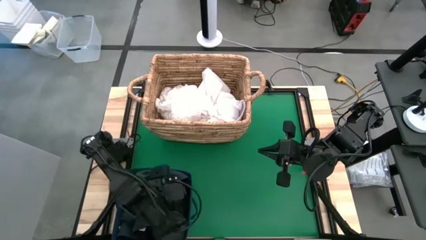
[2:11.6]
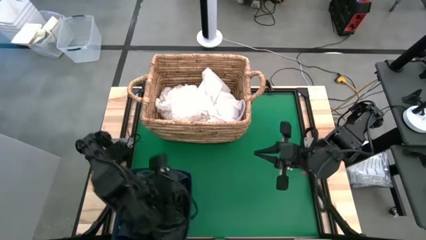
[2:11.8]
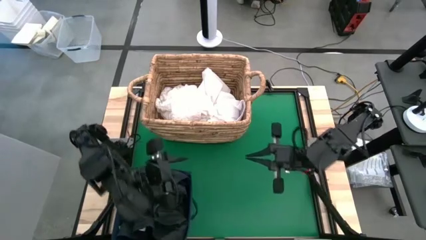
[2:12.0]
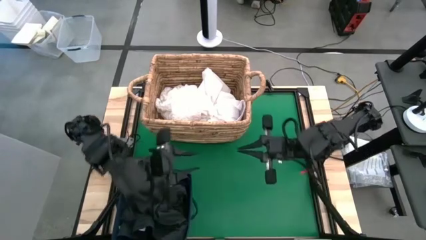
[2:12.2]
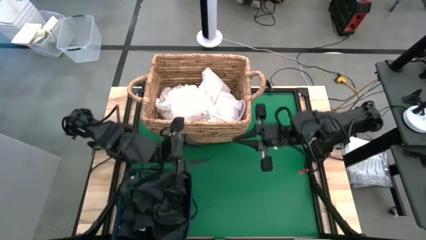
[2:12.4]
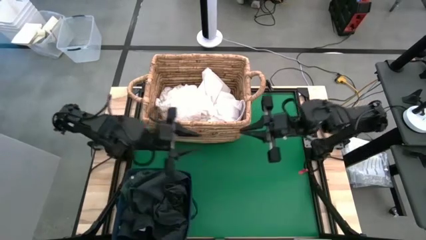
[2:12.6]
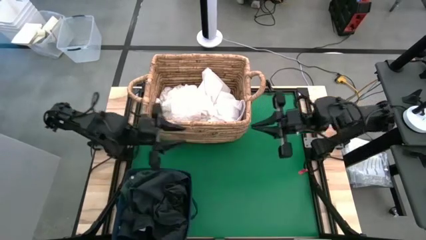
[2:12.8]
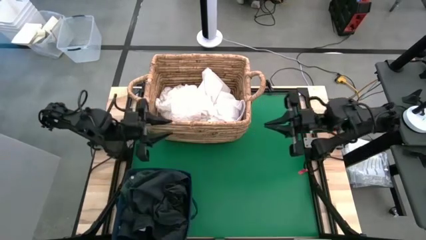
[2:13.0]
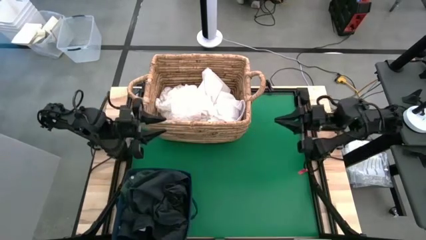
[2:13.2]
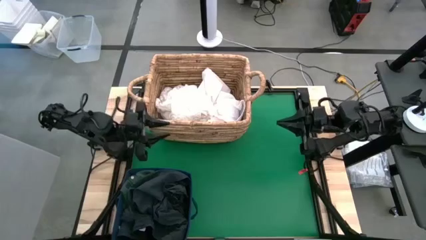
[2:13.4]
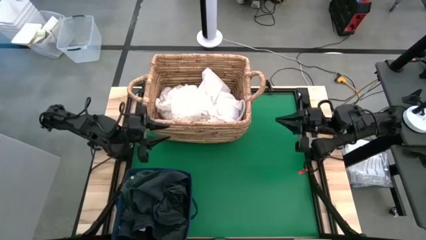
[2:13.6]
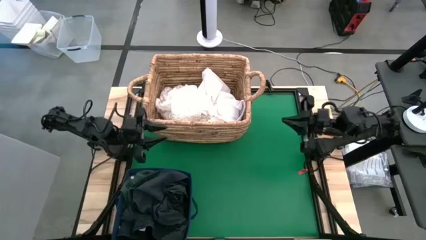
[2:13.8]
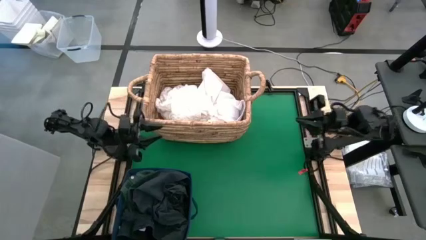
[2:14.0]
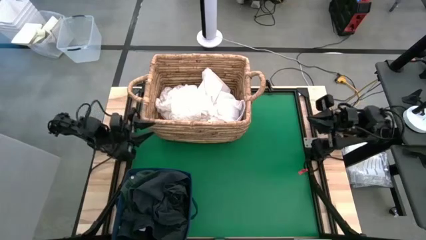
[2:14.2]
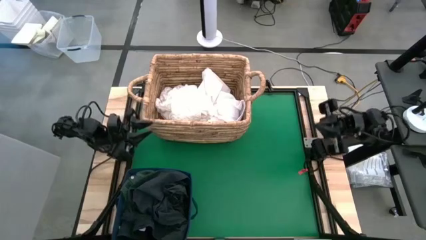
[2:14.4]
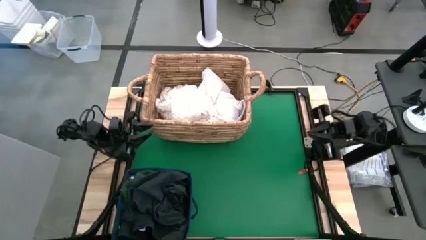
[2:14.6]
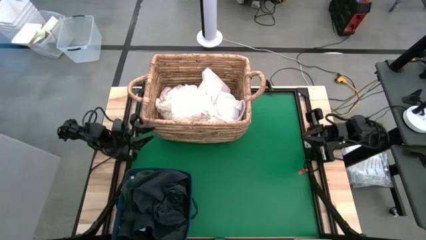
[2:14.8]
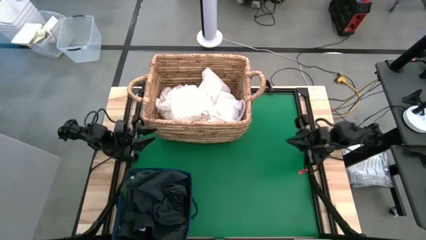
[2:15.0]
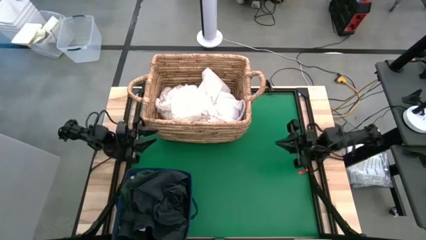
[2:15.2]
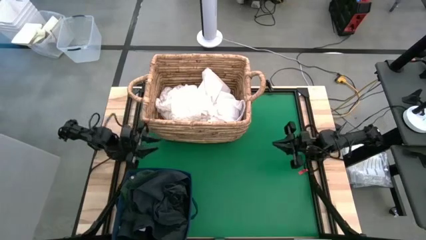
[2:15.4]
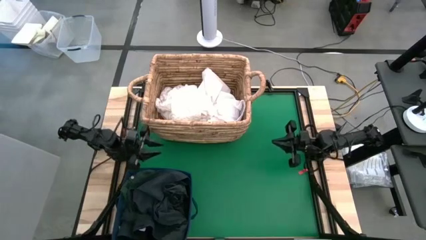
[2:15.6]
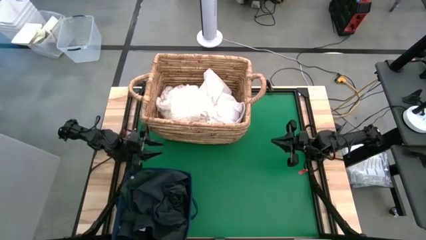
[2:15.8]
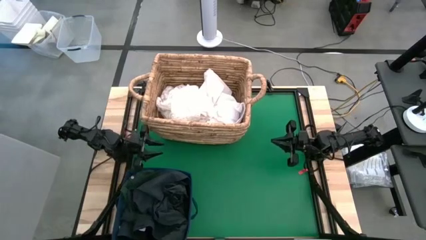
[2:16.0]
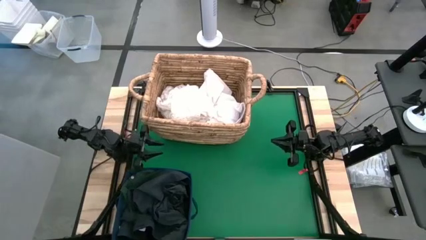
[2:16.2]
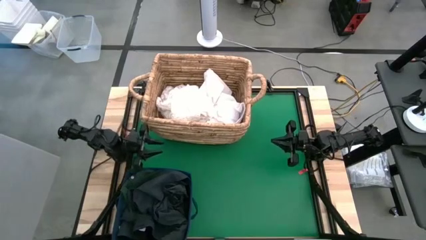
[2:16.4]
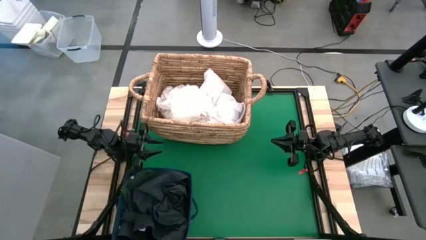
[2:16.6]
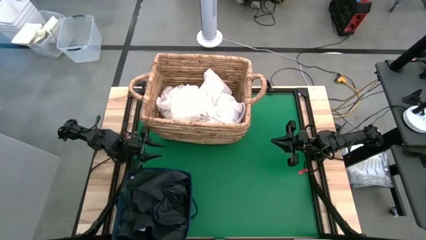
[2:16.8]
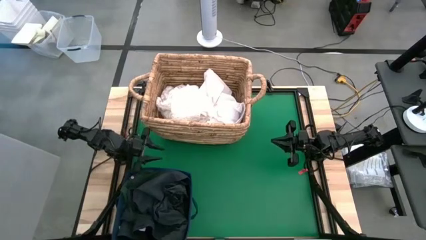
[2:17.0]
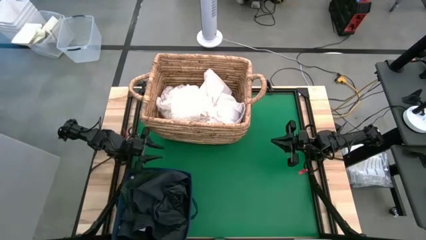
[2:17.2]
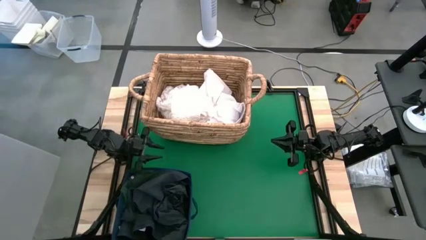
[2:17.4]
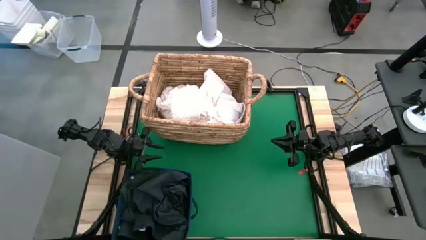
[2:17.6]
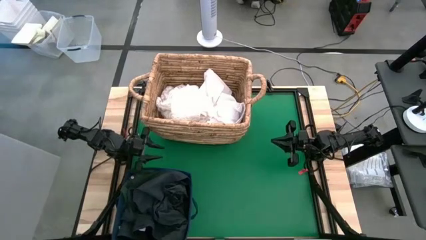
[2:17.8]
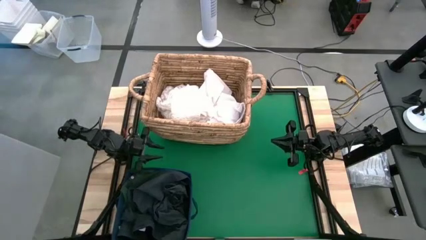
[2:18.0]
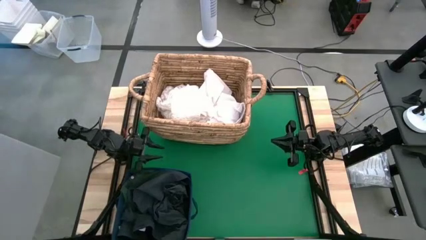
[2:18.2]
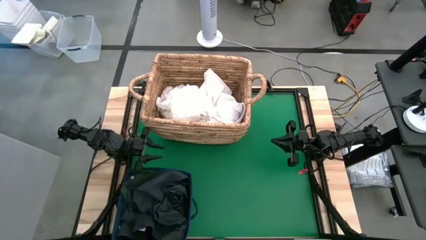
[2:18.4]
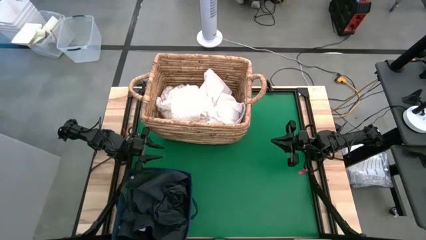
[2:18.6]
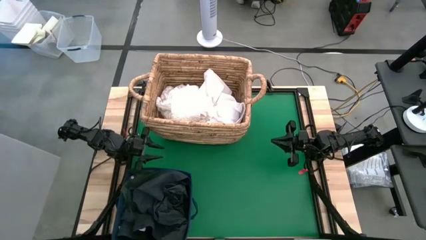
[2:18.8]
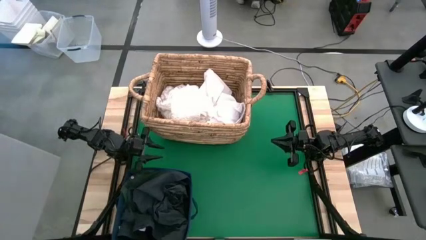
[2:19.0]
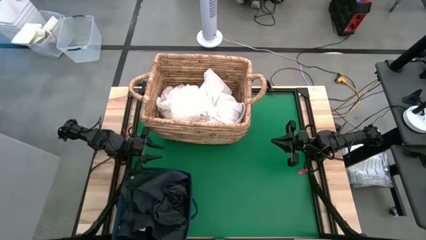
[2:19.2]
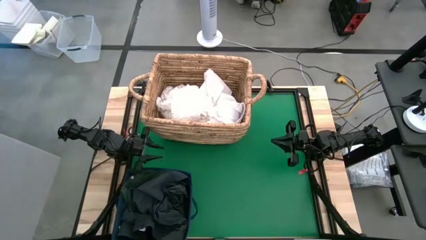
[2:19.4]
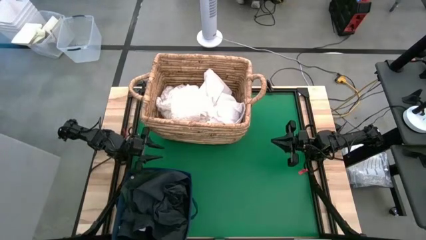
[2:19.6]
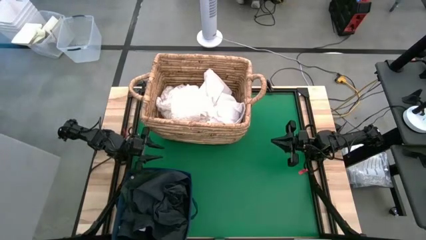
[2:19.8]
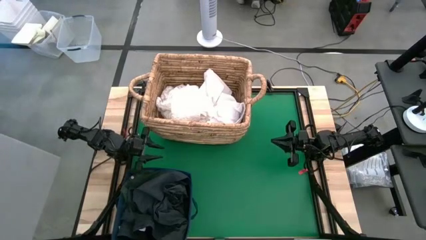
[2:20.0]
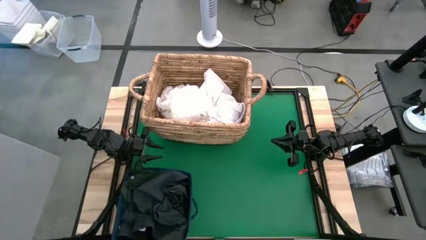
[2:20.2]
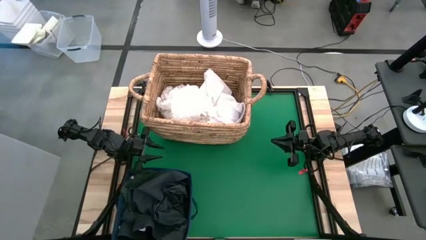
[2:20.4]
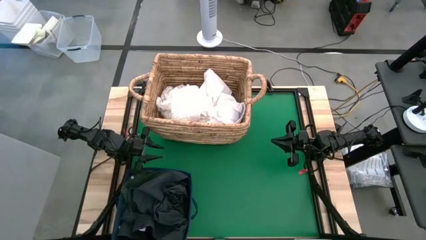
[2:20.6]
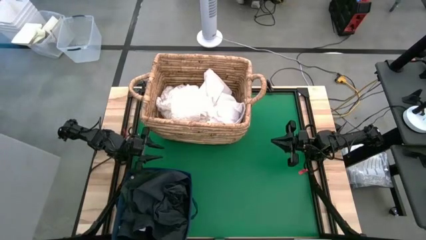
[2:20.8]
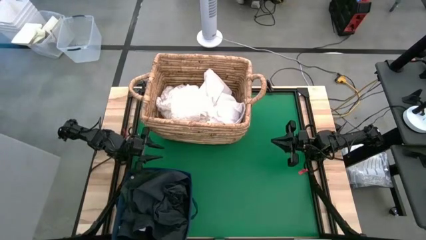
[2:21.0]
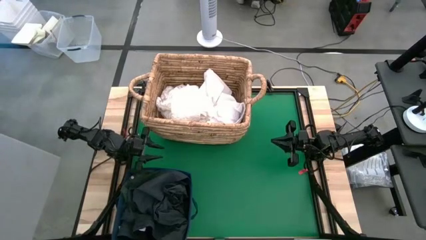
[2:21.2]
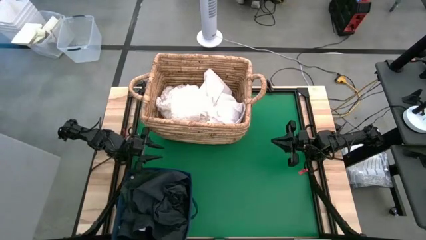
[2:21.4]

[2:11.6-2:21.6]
Return to Home Position
